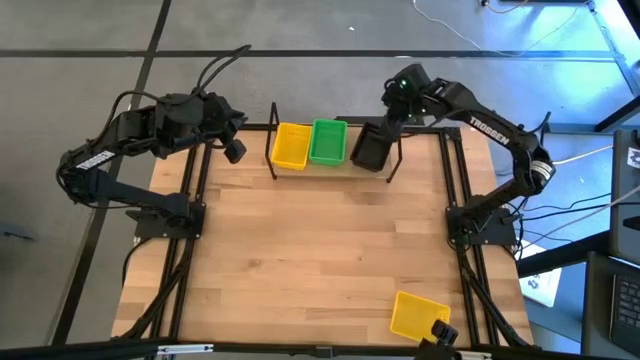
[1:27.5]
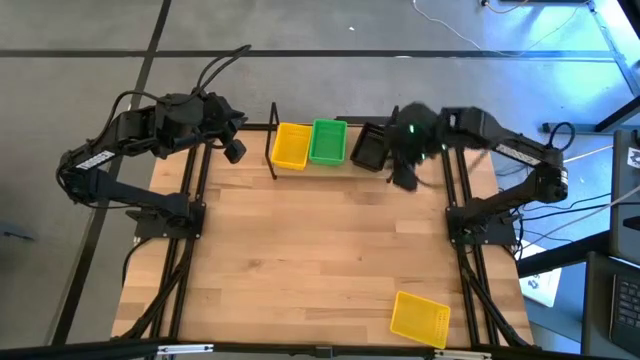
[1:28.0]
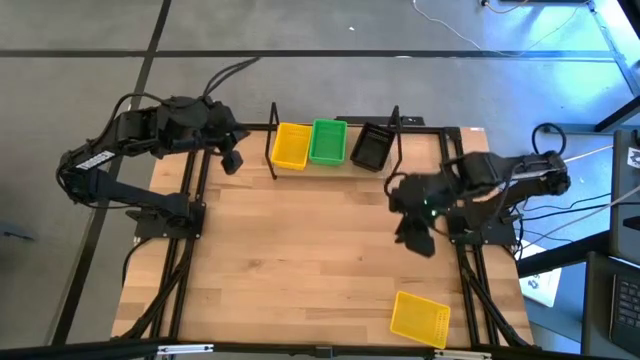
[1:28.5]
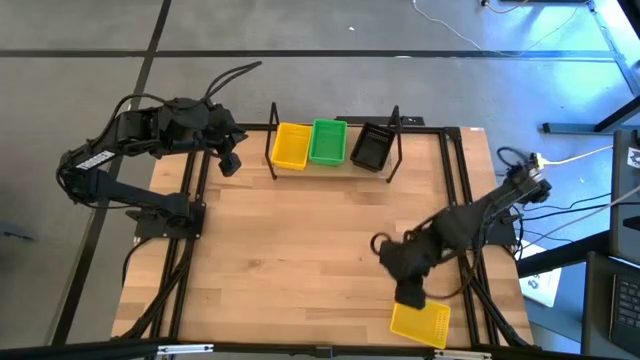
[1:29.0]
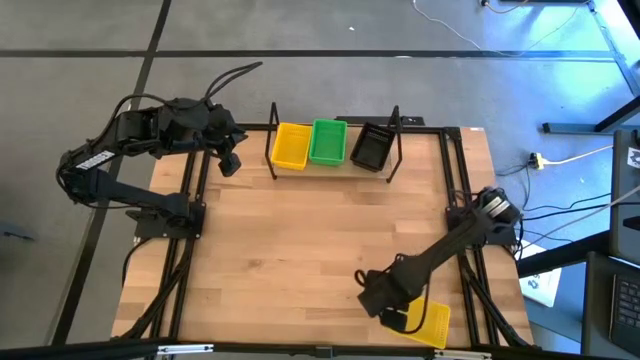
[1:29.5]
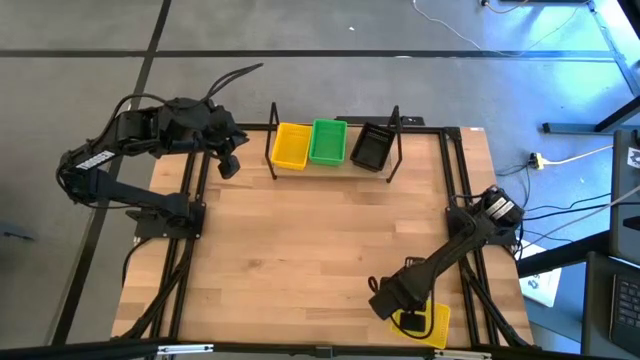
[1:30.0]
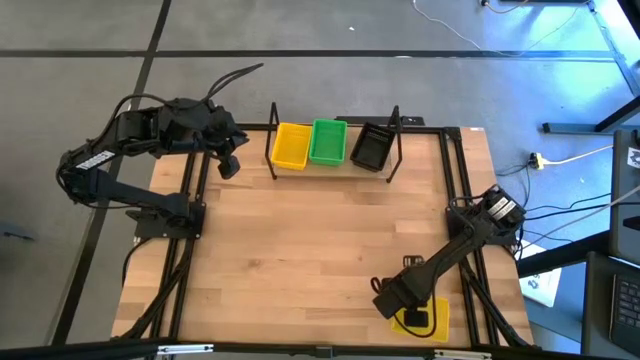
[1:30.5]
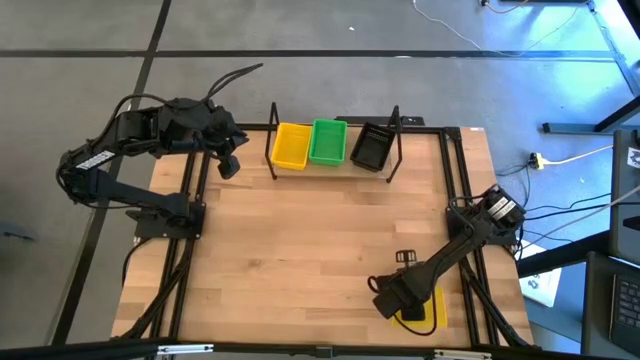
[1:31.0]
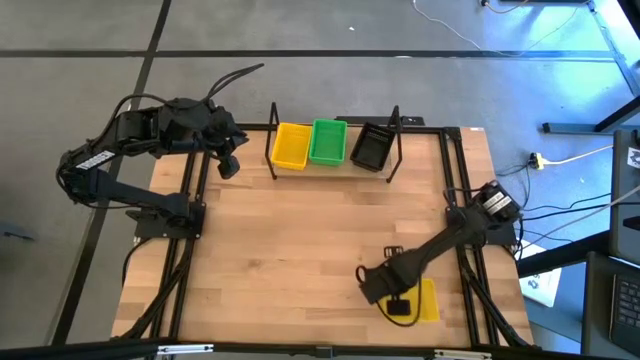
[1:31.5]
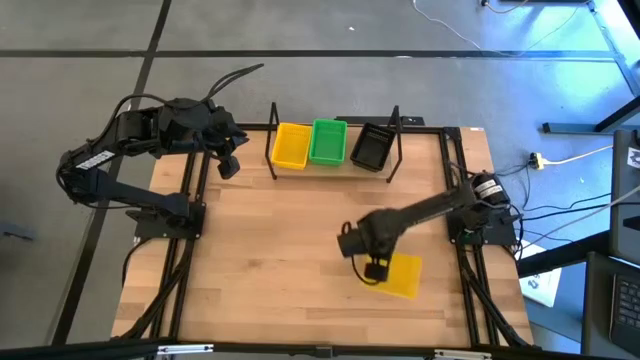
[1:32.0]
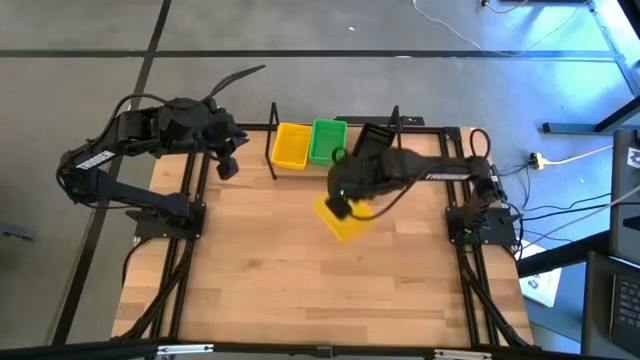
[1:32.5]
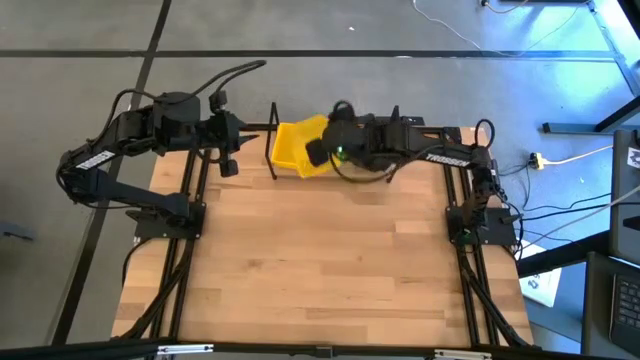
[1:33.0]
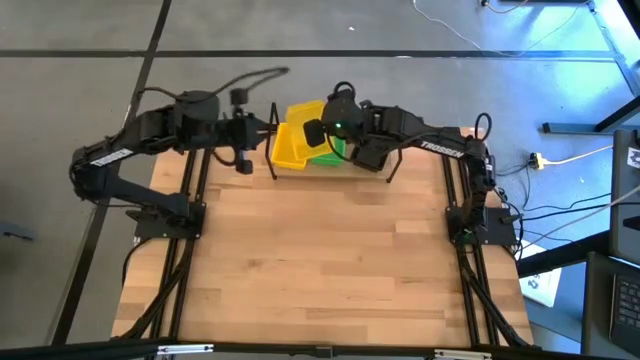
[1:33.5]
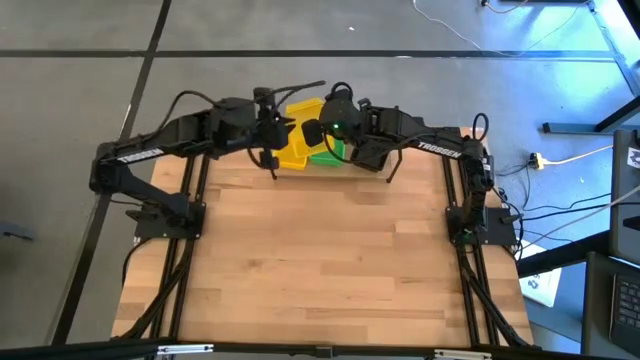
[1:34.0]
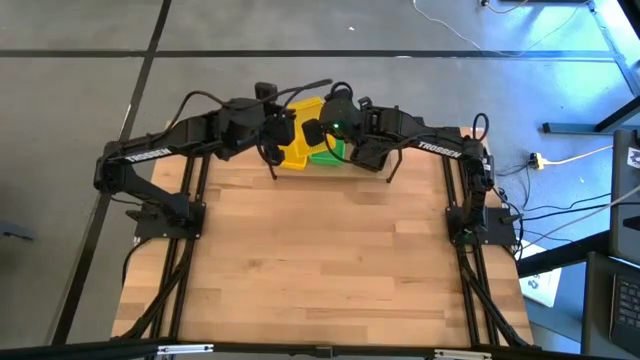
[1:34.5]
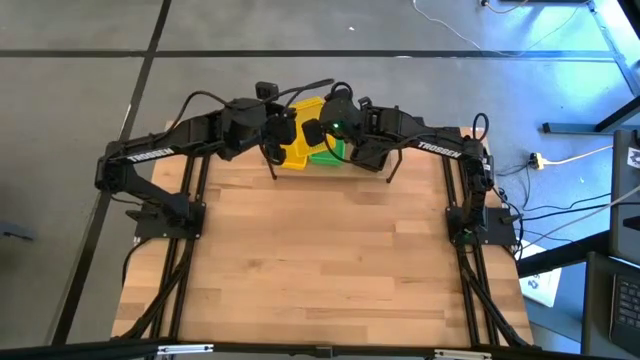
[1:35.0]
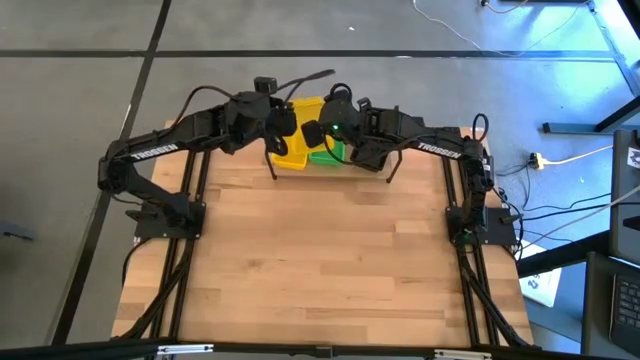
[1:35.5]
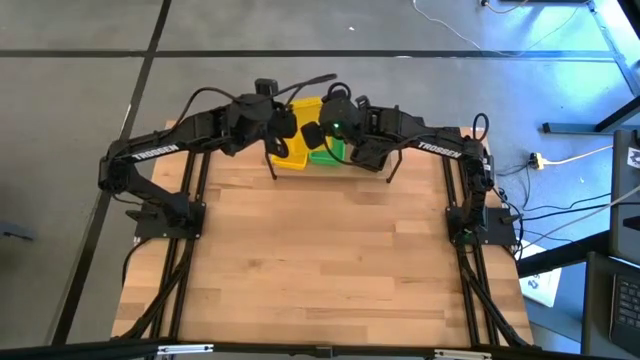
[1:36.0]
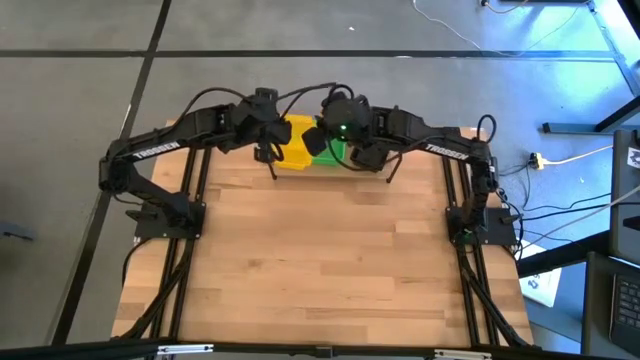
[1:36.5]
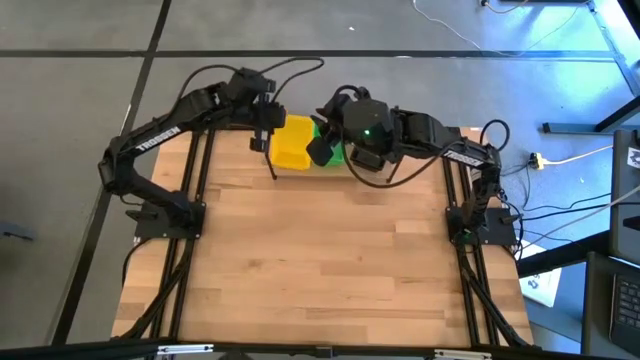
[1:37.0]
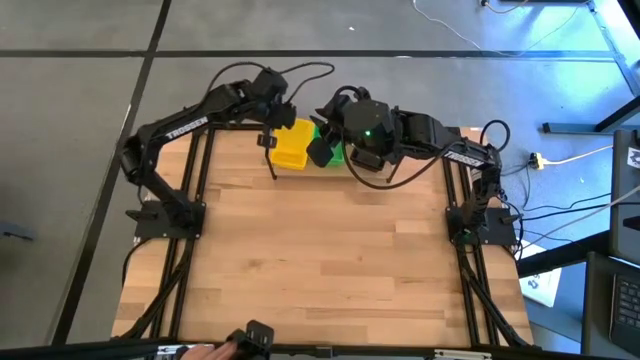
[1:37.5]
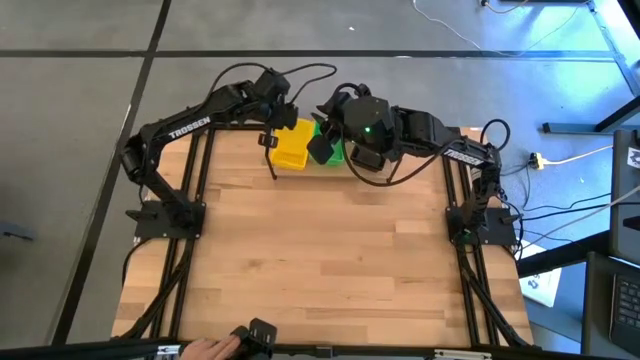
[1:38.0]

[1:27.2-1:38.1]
Task: Stack baskets on shelf by color
Stack the yellow bin on top of the yellow bin on the shelf

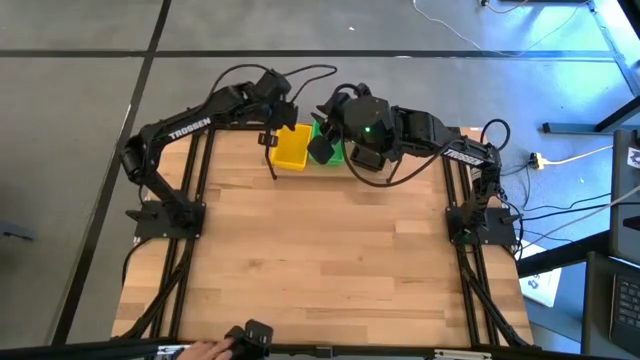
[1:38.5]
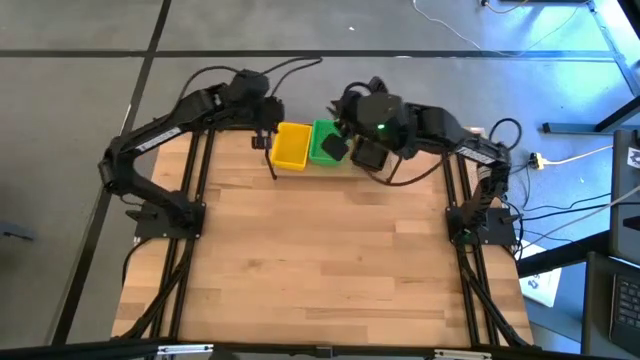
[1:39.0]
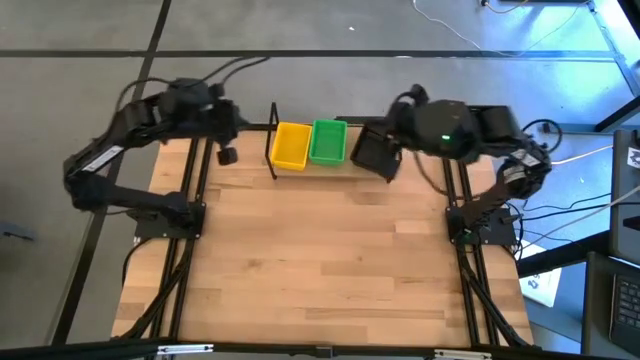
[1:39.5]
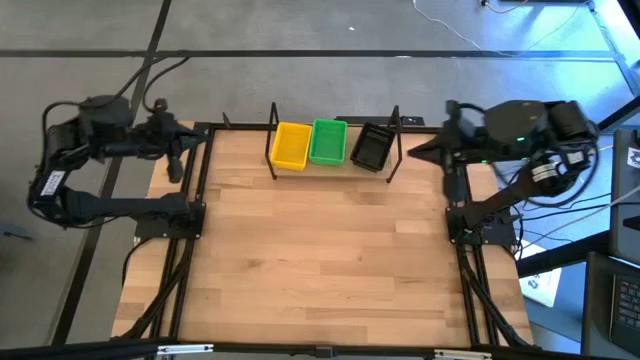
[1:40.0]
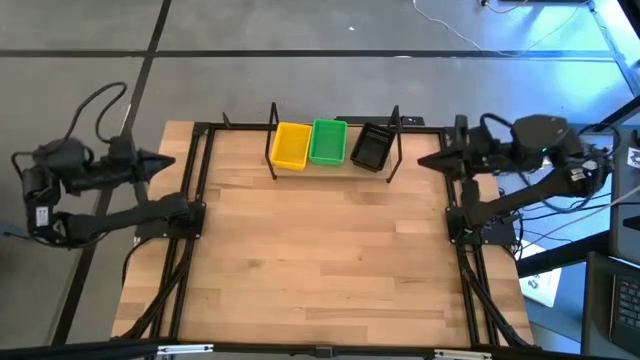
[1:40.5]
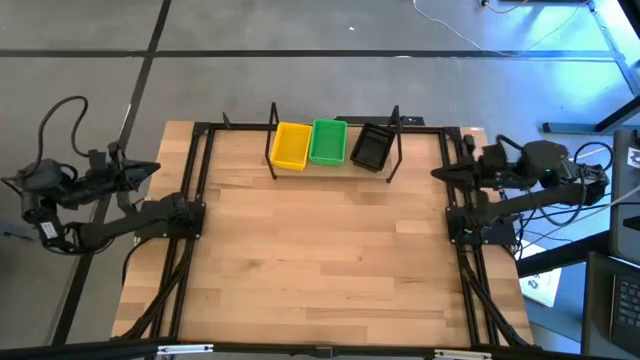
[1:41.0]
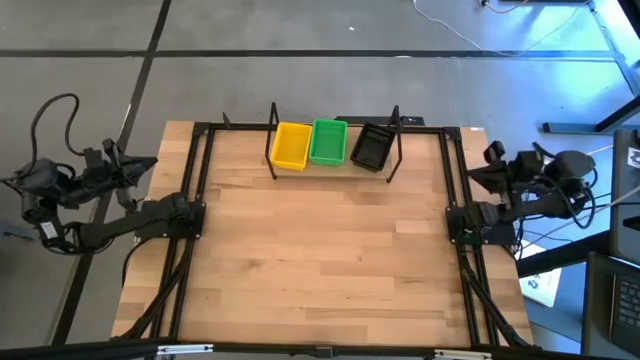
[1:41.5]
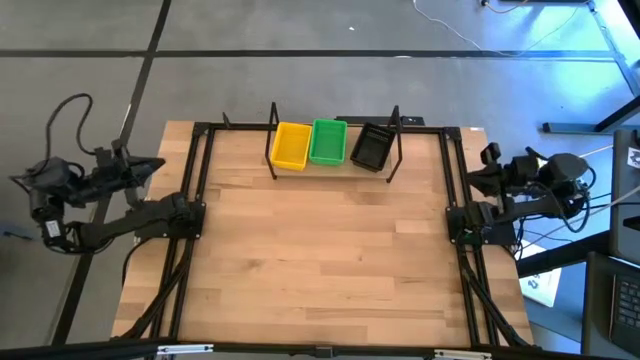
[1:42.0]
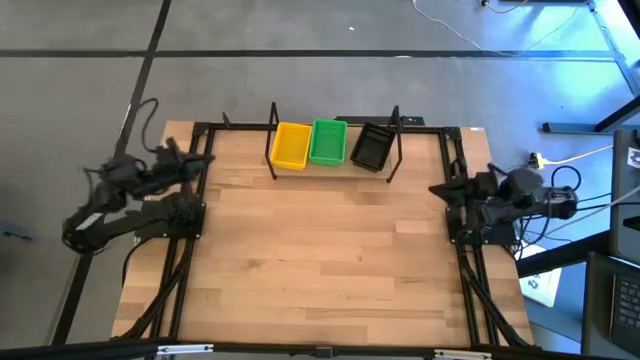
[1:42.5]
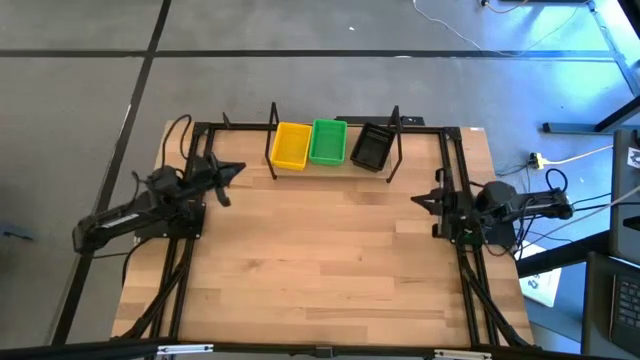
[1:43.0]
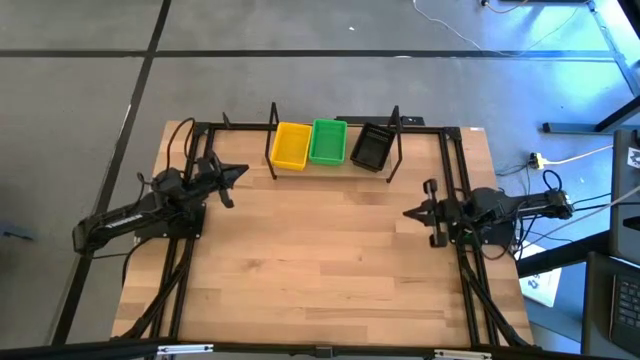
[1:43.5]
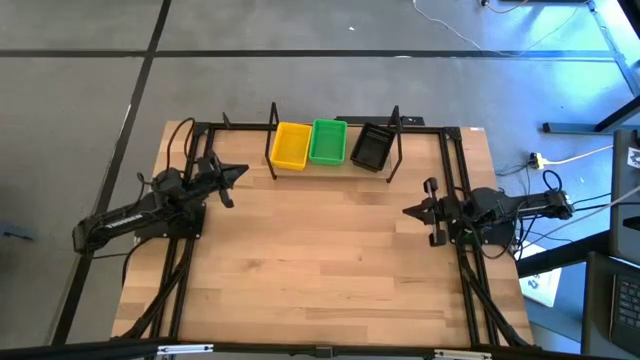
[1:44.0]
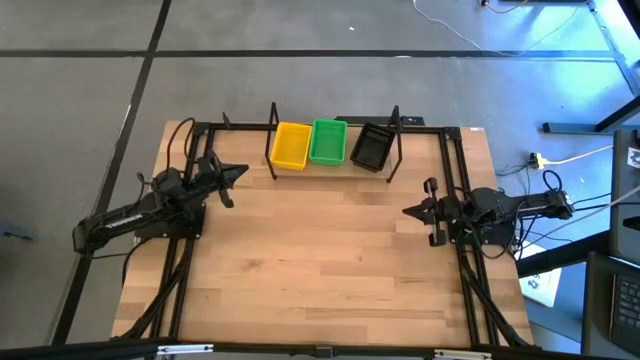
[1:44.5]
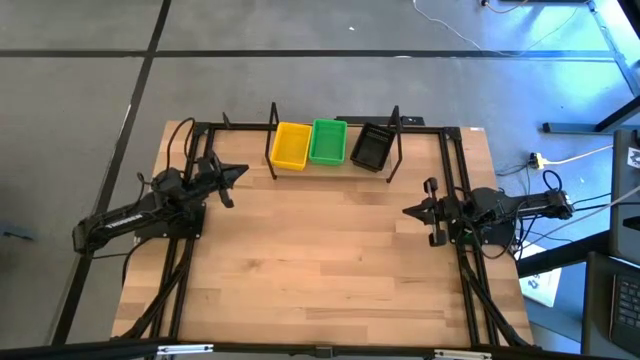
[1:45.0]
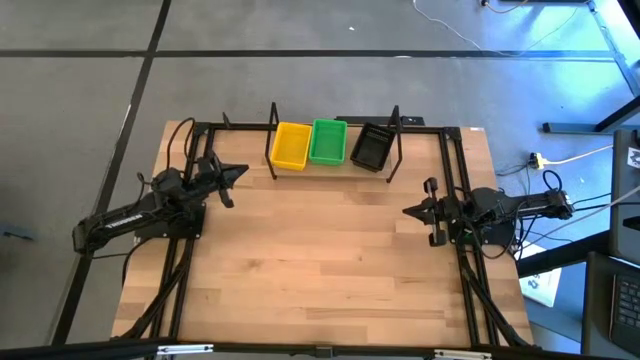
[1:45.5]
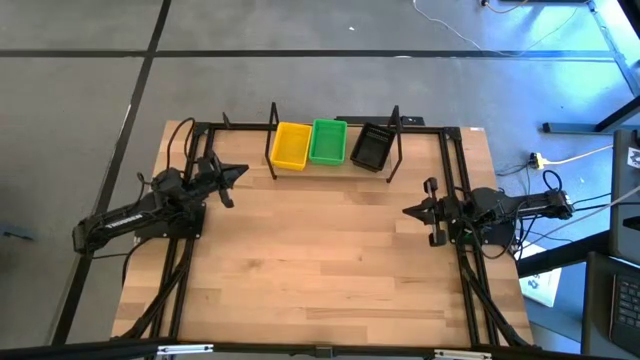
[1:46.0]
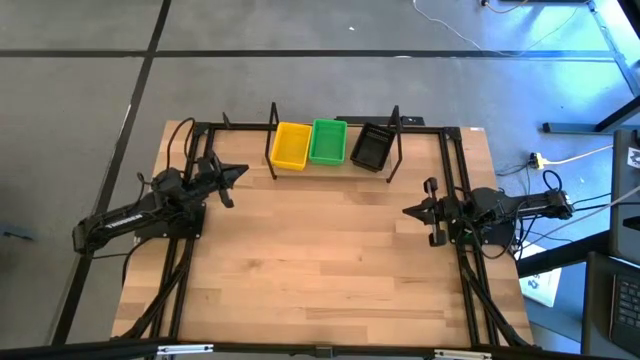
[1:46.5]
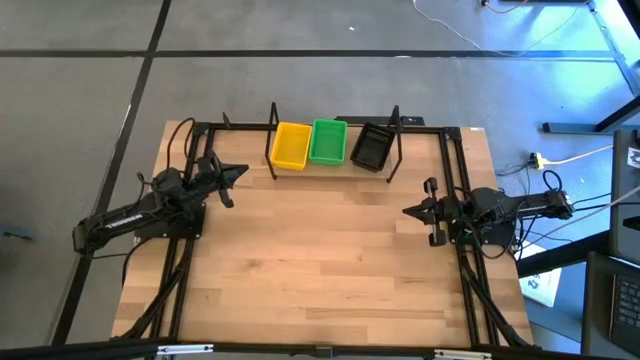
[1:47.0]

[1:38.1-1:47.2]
Return to Home Position
